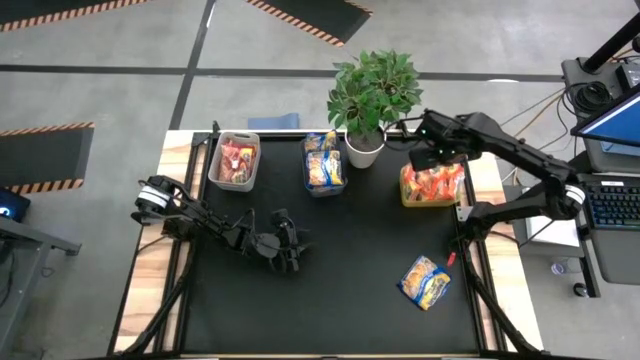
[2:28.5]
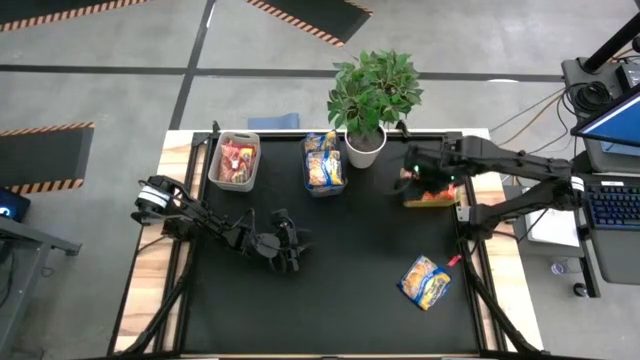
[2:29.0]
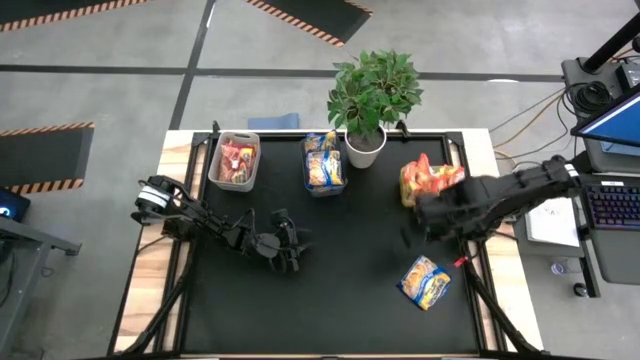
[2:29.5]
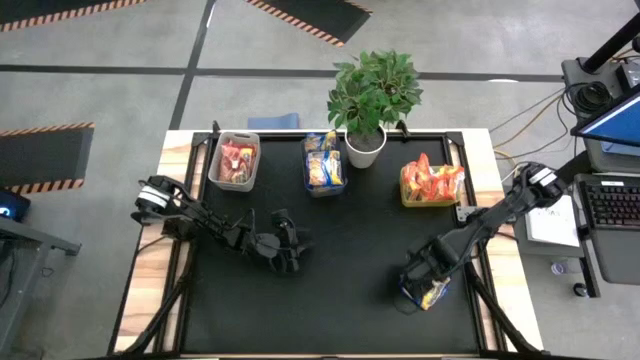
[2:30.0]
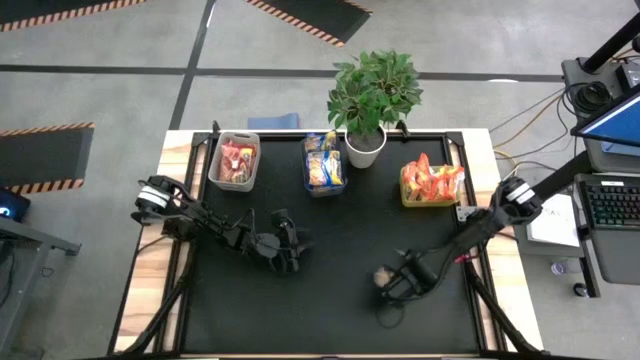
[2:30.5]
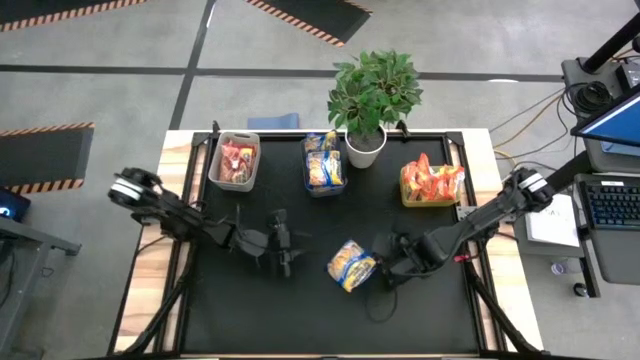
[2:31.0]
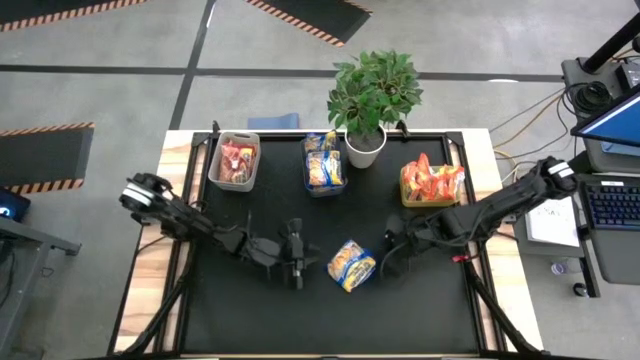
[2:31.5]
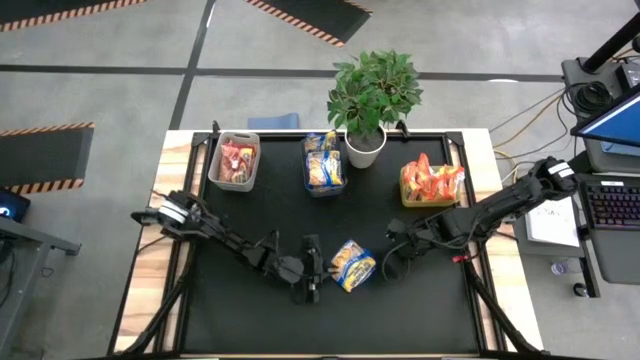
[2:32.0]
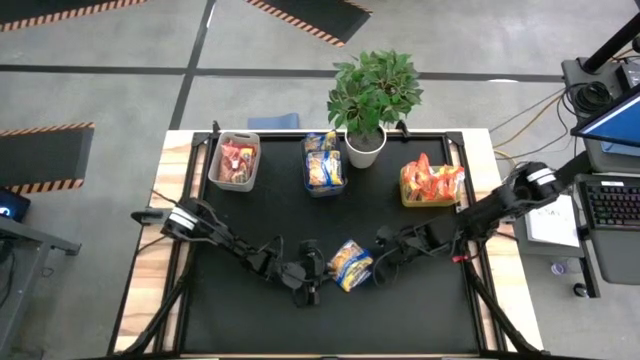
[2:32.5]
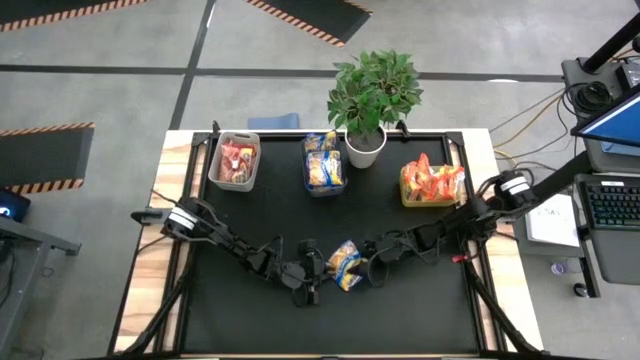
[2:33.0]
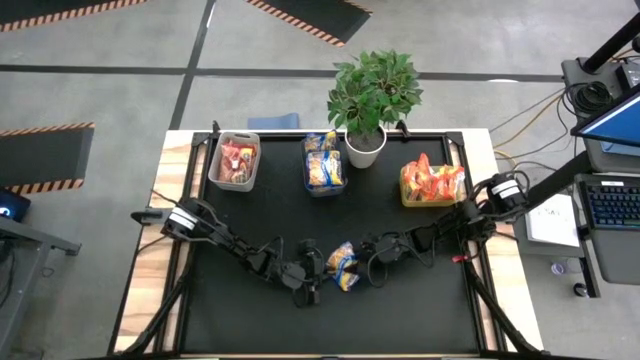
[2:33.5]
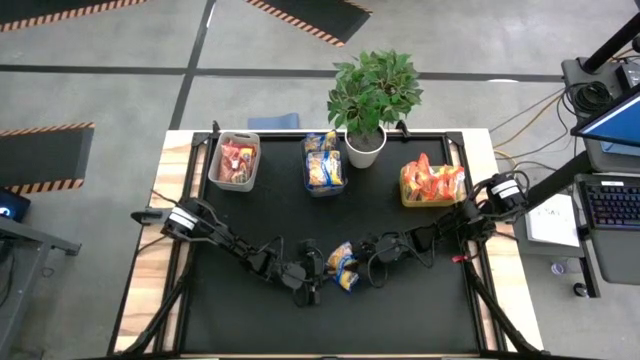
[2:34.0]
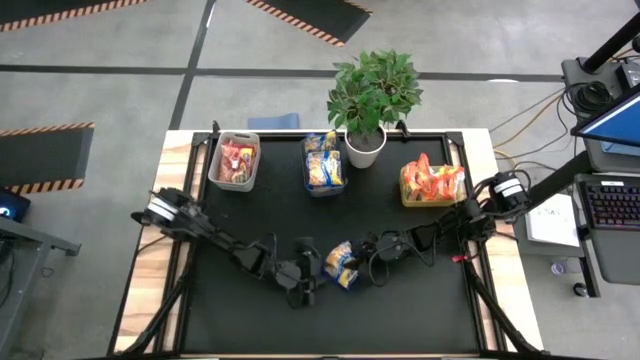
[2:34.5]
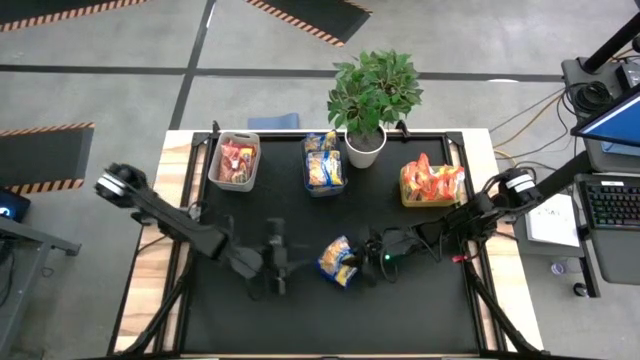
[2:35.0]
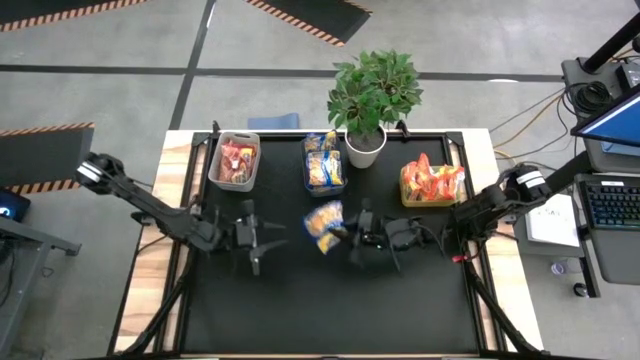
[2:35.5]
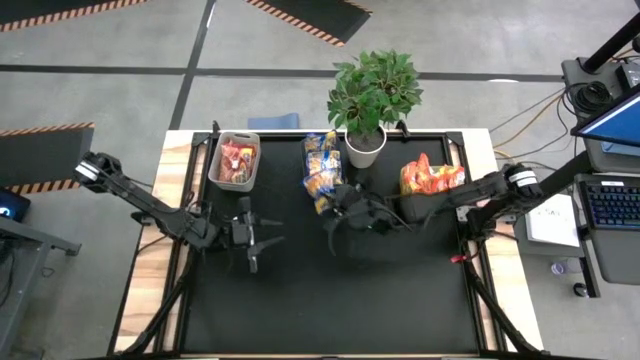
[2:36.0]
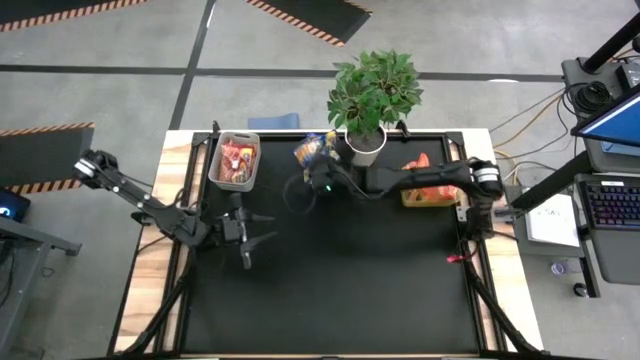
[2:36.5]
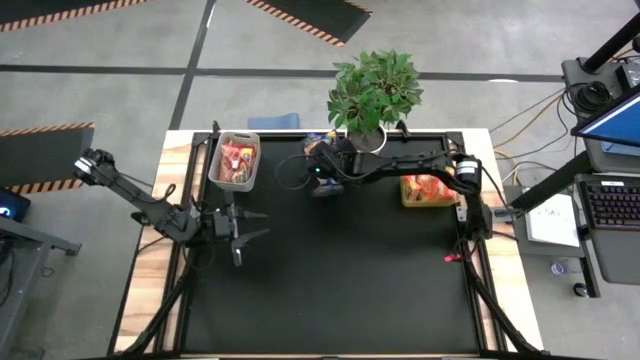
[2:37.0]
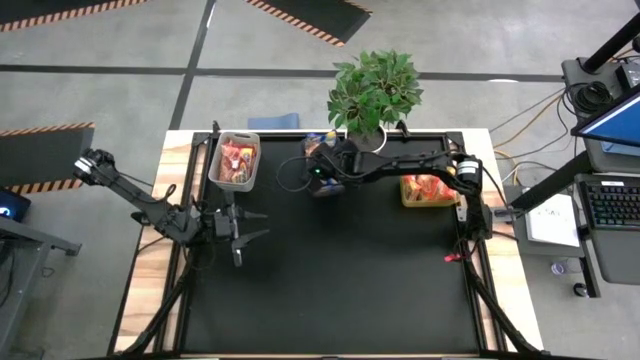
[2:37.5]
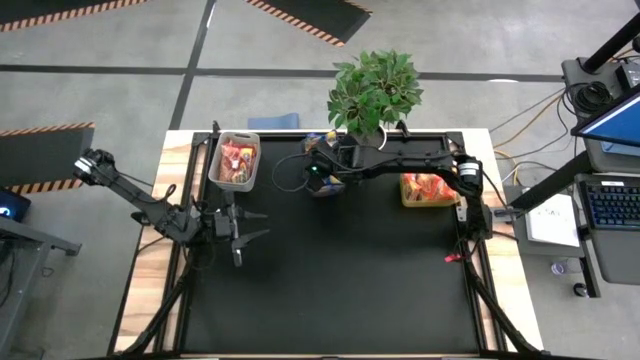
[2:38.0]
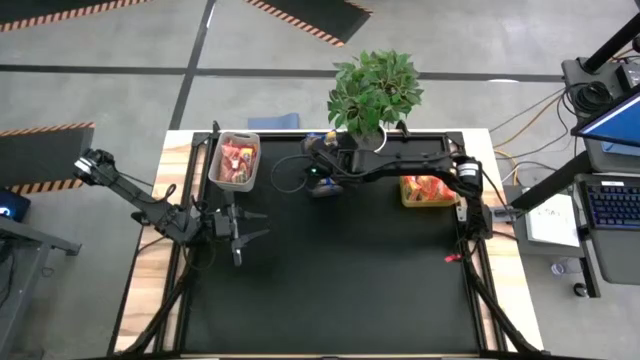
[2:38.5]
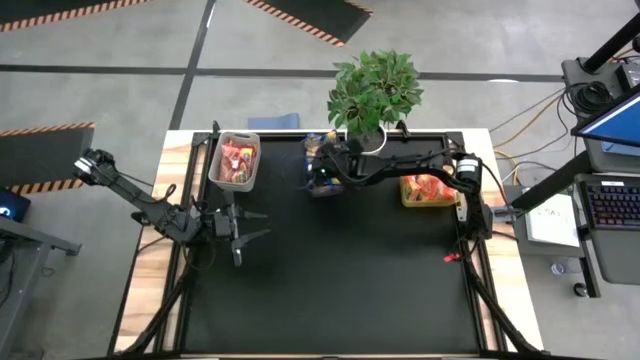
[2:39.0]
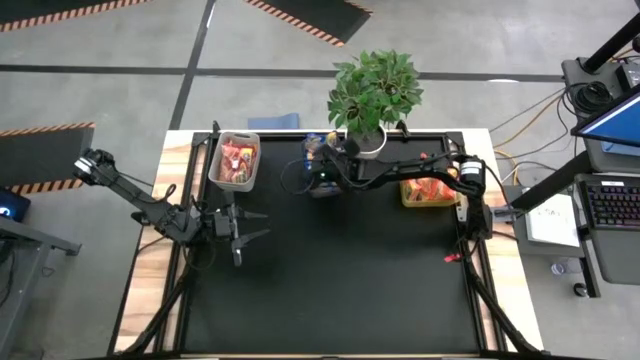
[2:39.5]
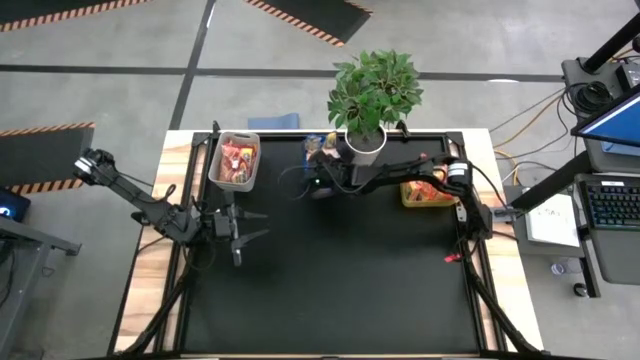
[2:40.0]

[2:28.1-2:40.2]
Task: Sort Maruchan noodles
Put the blue noodle pack into the black bin

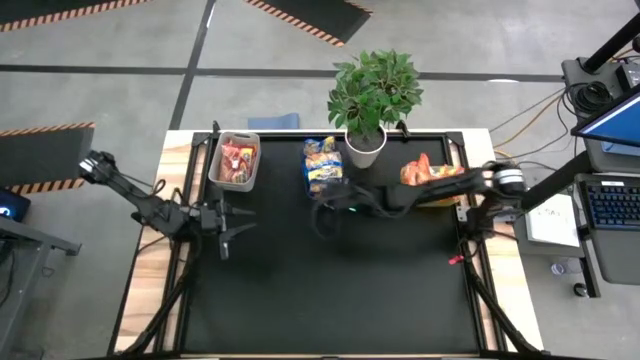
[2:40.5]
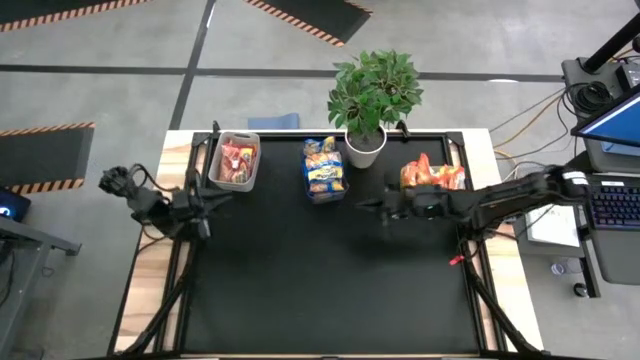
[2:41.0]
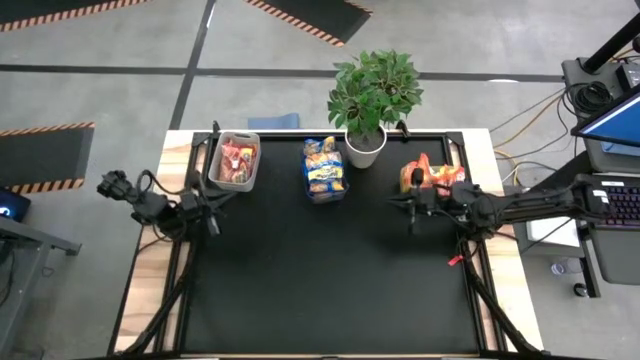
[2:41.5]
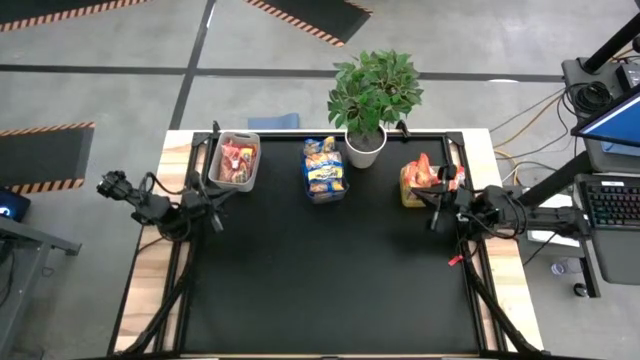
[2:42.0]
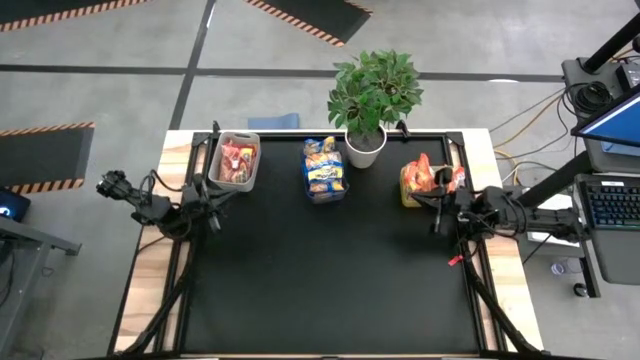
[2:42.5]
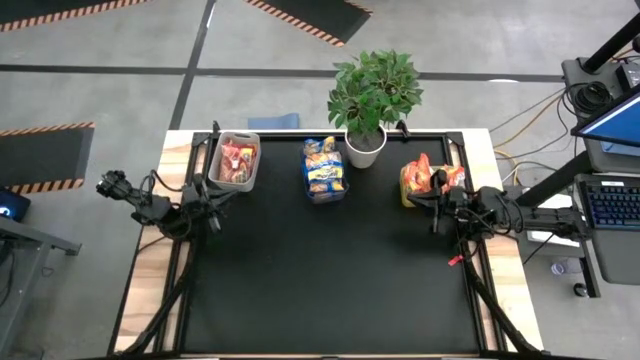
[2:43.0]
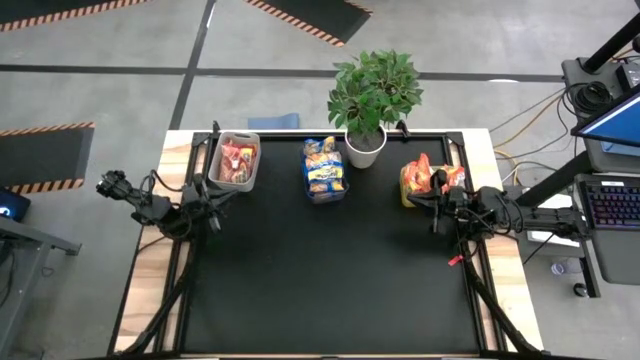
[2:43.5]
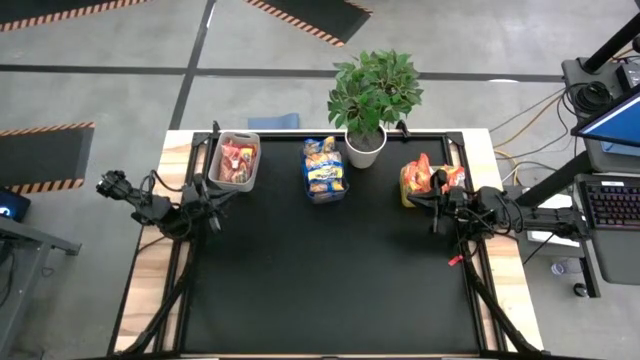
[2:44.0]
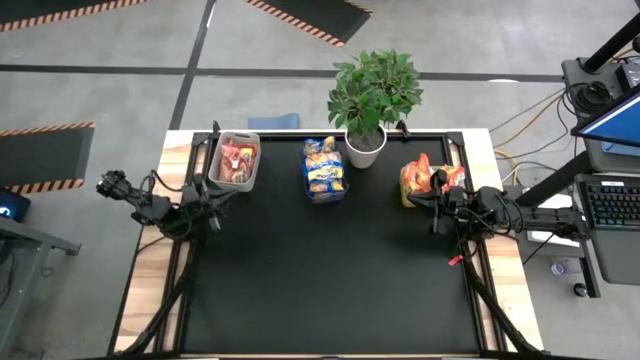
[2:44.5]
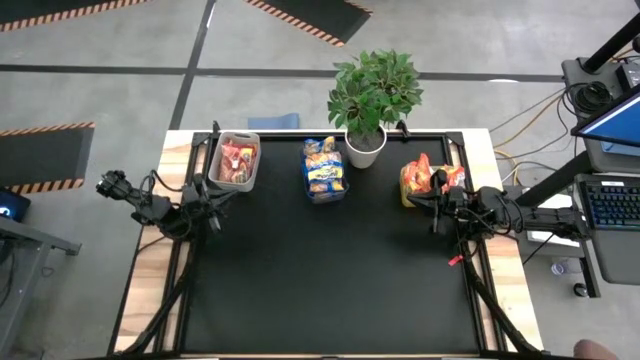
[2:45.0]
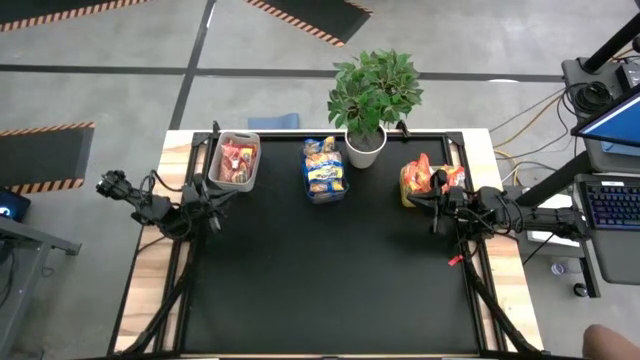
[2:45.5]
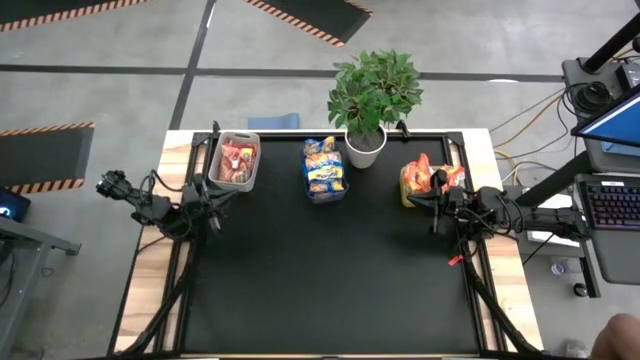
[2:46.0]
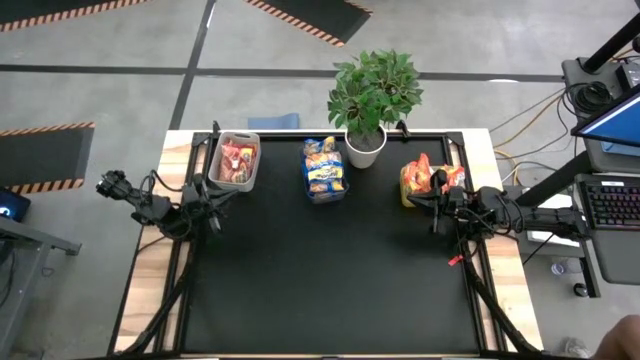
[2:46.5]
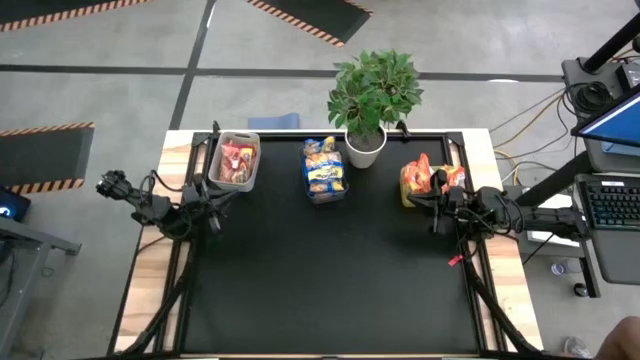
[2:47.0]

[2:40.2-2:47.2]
Return to Home Position

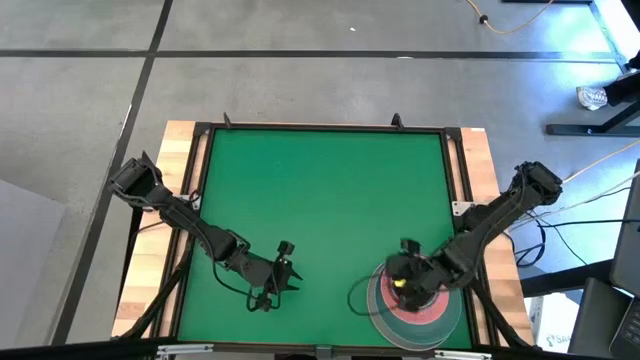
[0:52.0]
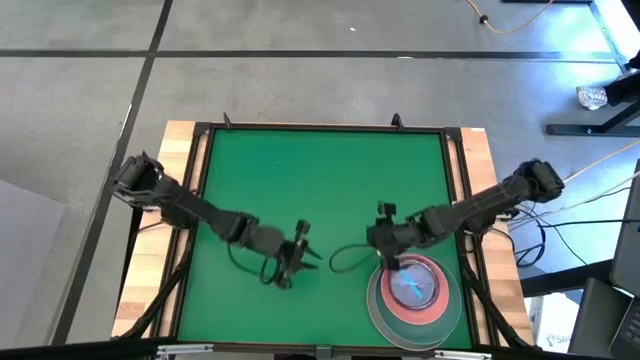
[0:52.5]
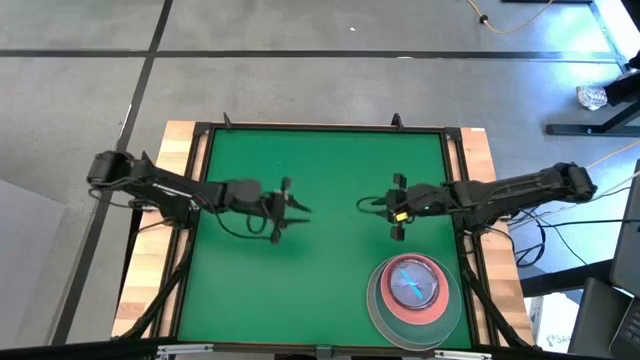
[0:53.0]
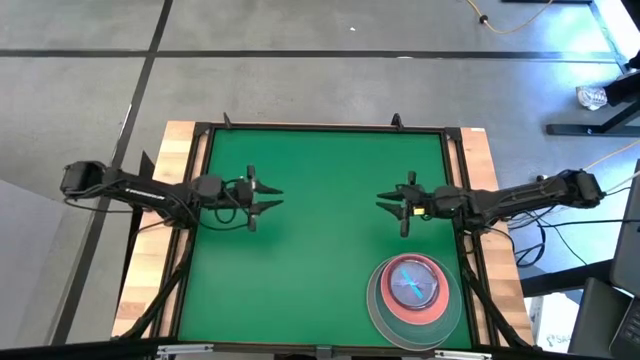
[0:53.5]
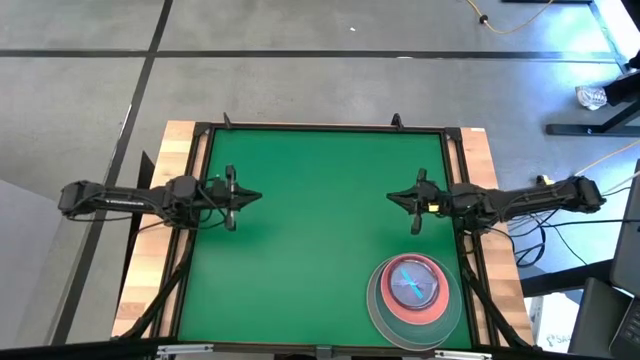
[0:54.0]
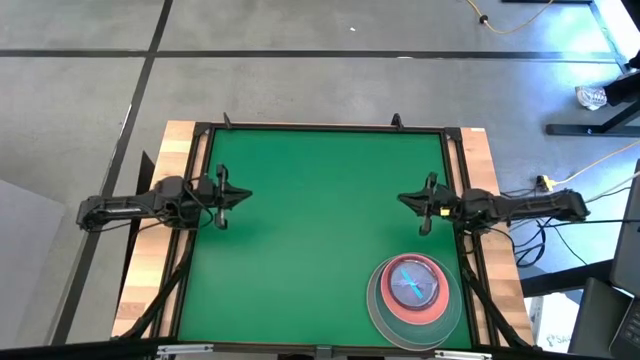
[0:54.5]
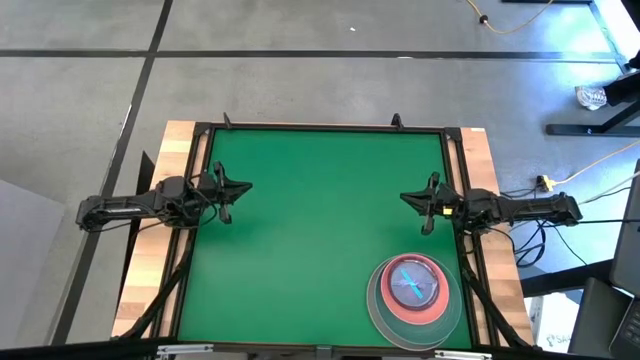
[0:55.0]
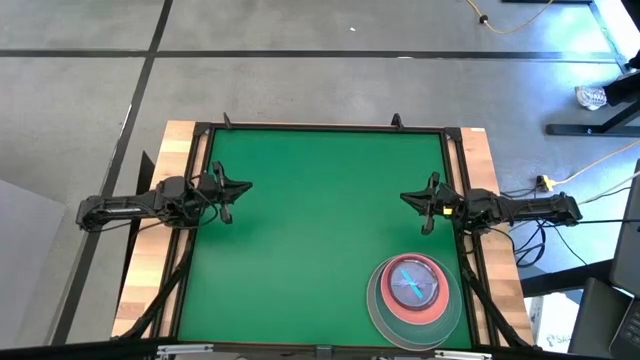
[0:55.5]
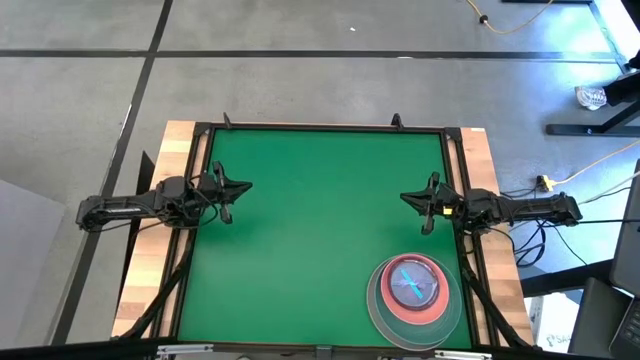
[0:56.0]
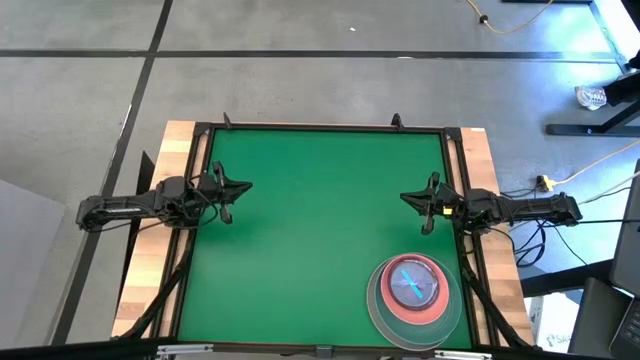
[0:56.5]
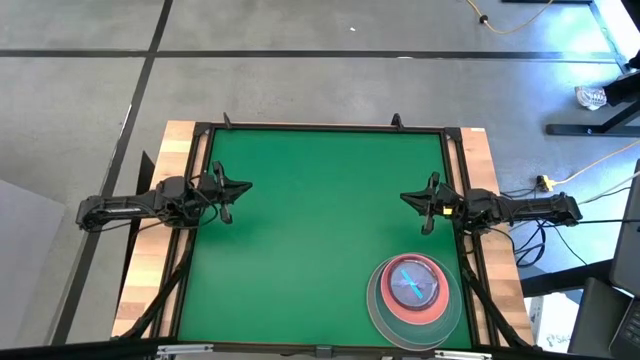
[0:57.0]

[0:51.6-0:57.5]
Task: Stack plastic plates
Return to Home Position
